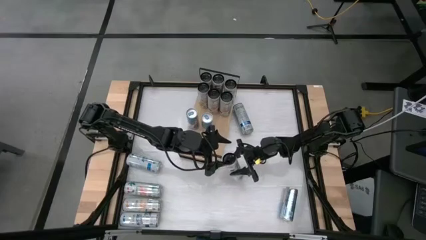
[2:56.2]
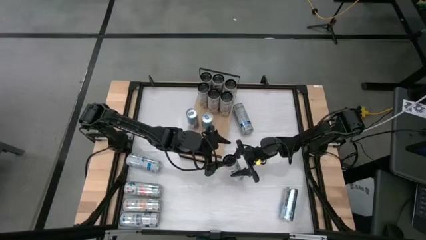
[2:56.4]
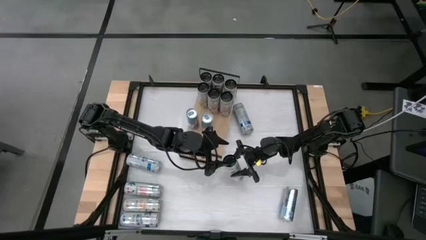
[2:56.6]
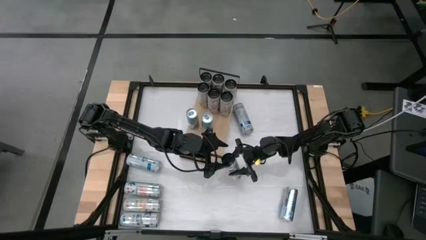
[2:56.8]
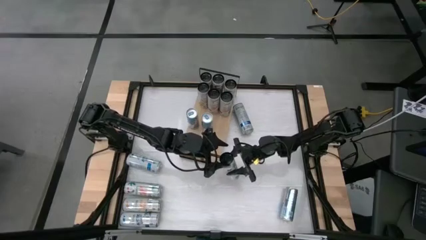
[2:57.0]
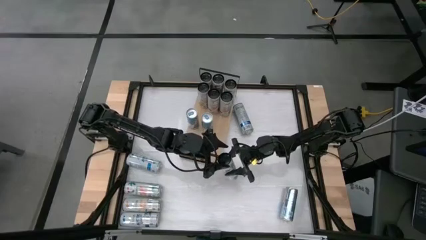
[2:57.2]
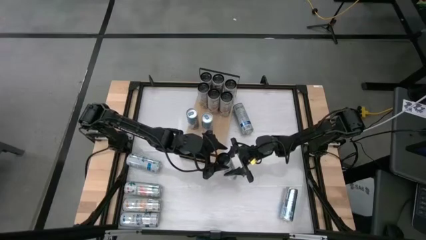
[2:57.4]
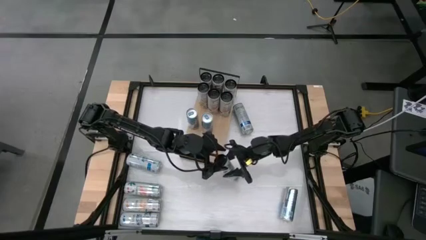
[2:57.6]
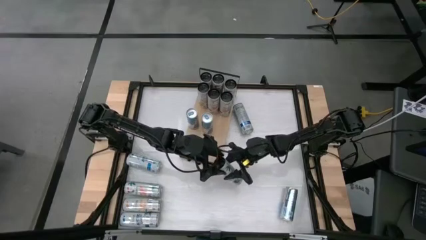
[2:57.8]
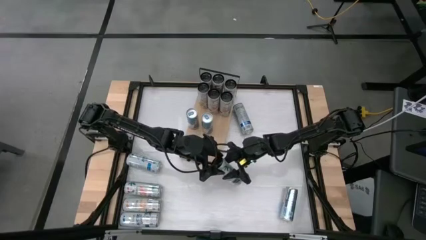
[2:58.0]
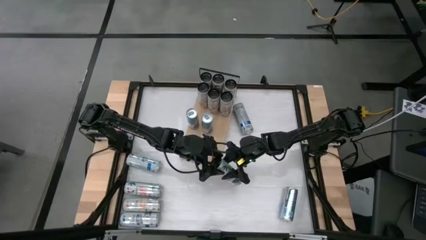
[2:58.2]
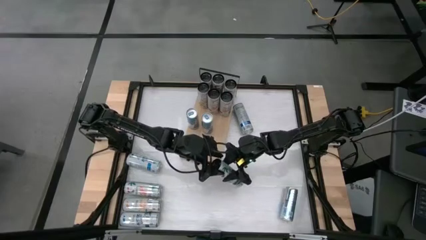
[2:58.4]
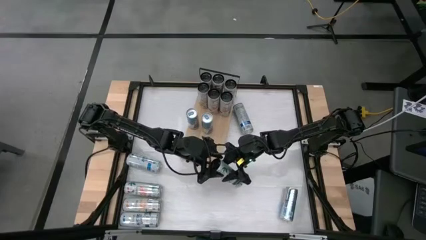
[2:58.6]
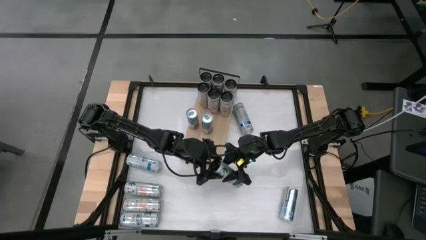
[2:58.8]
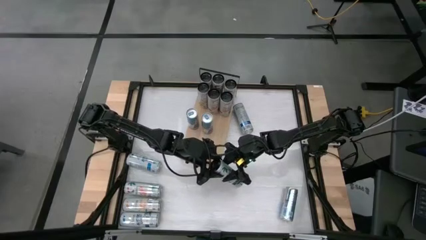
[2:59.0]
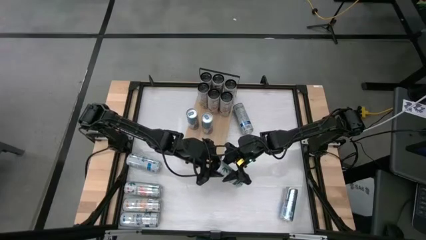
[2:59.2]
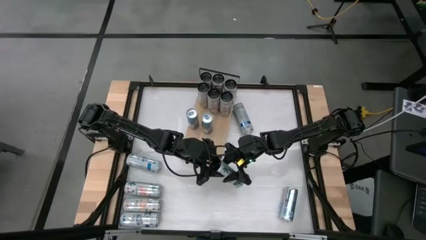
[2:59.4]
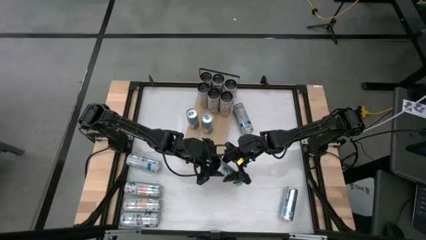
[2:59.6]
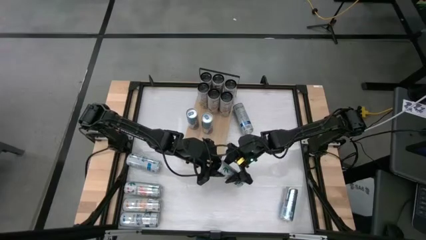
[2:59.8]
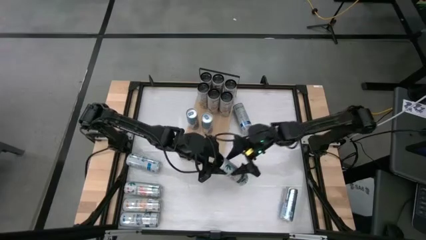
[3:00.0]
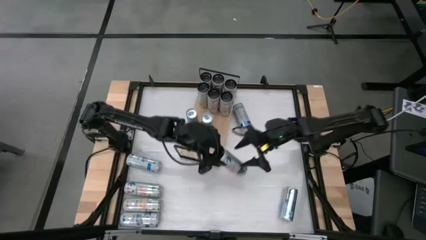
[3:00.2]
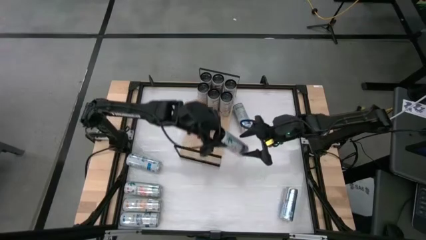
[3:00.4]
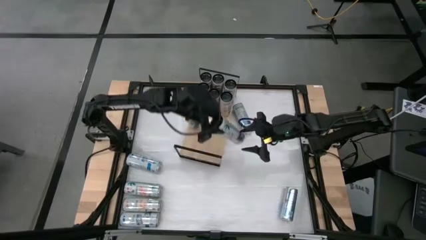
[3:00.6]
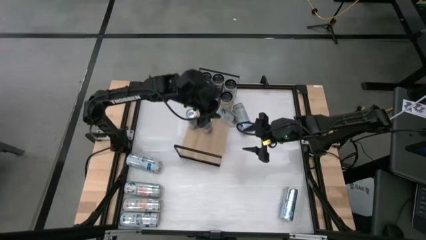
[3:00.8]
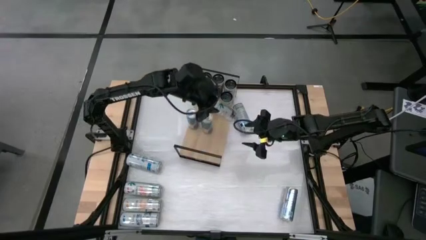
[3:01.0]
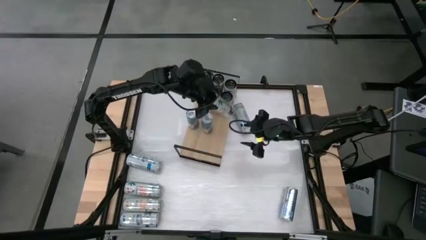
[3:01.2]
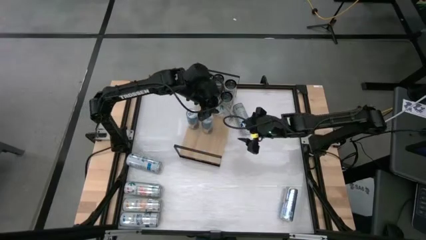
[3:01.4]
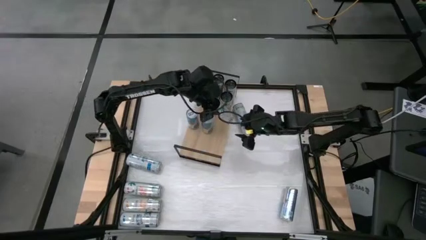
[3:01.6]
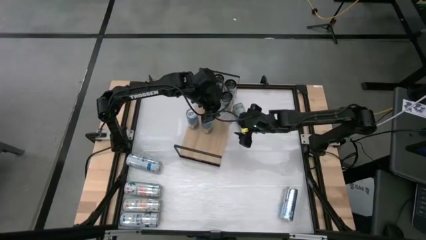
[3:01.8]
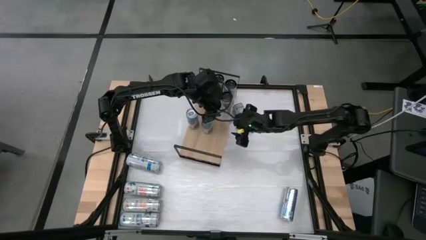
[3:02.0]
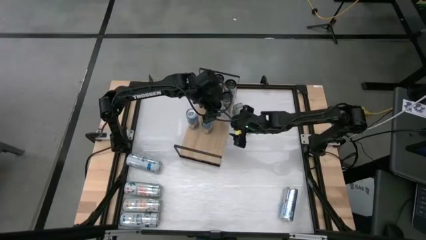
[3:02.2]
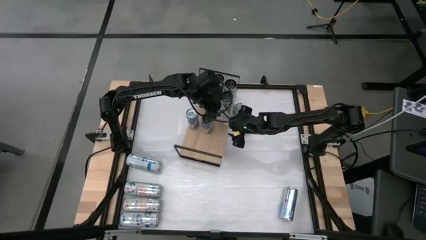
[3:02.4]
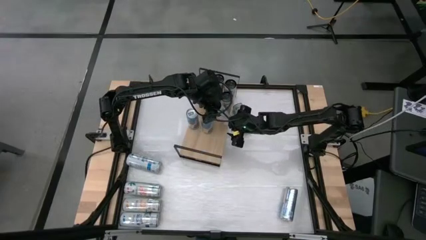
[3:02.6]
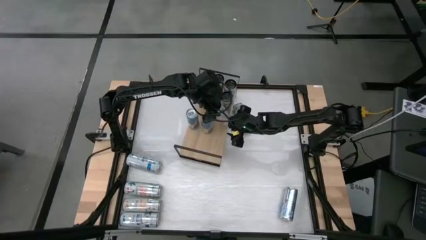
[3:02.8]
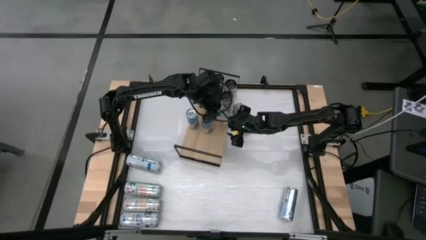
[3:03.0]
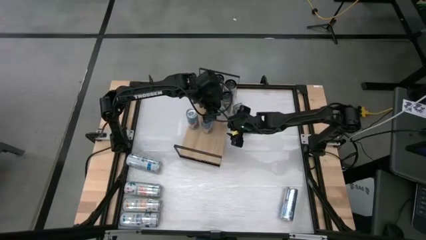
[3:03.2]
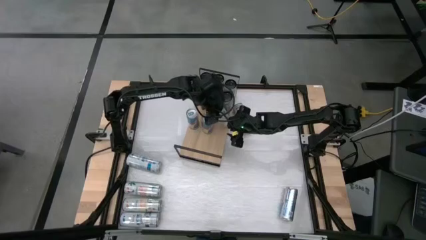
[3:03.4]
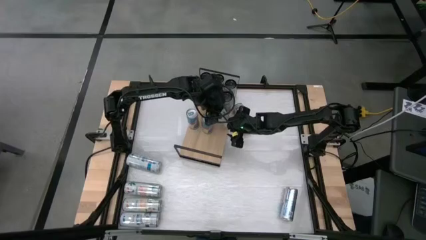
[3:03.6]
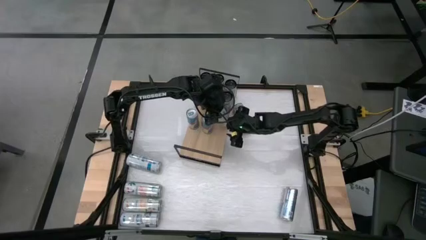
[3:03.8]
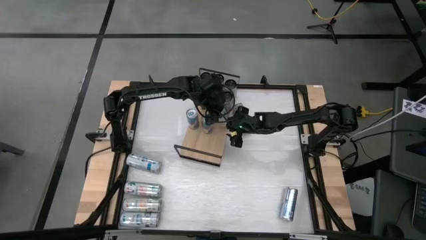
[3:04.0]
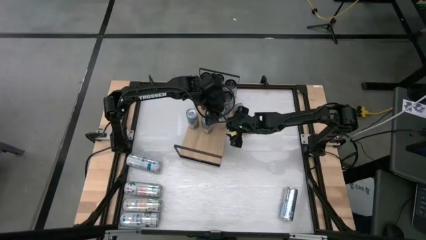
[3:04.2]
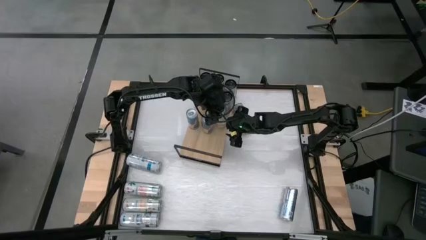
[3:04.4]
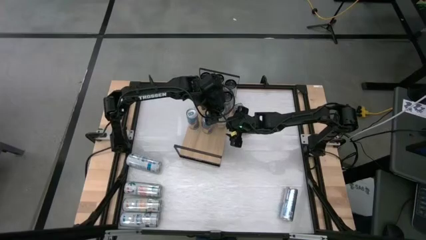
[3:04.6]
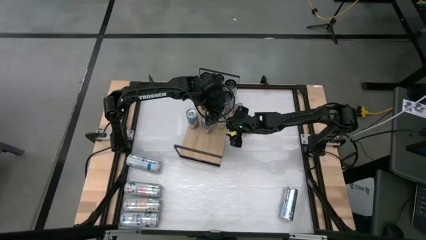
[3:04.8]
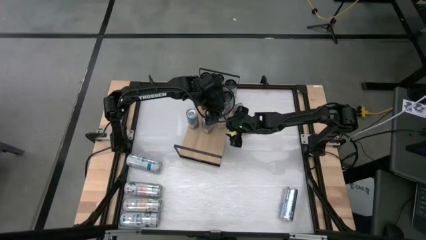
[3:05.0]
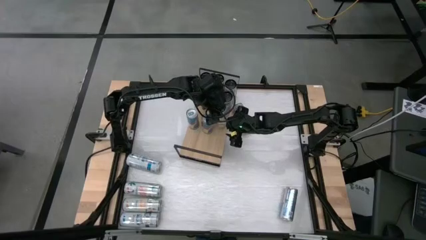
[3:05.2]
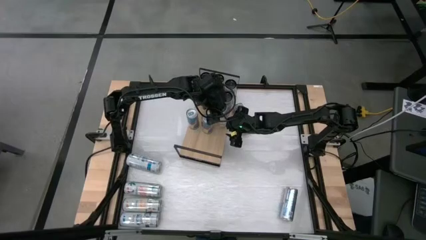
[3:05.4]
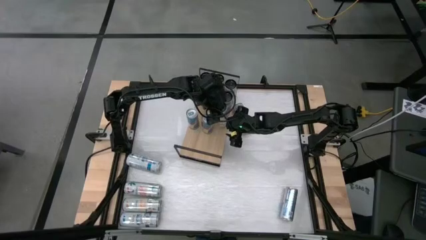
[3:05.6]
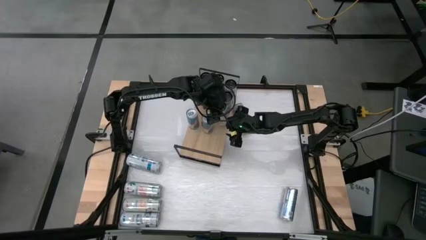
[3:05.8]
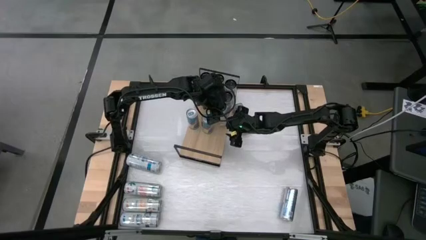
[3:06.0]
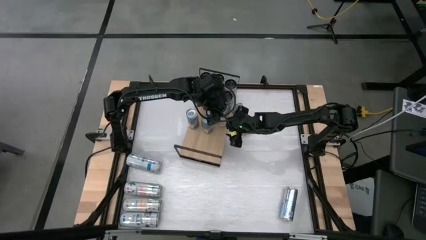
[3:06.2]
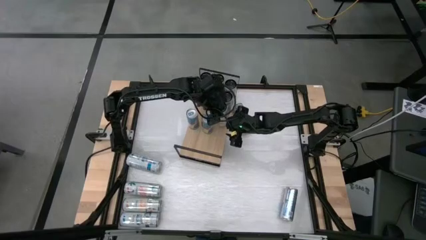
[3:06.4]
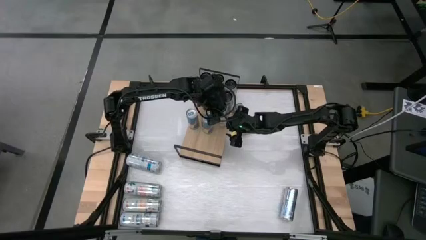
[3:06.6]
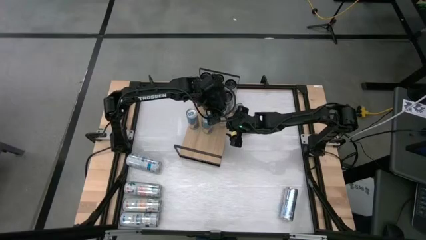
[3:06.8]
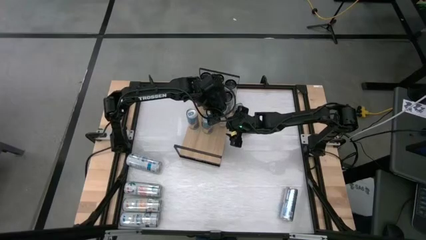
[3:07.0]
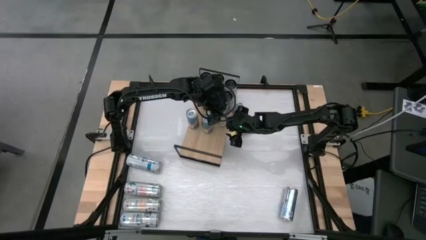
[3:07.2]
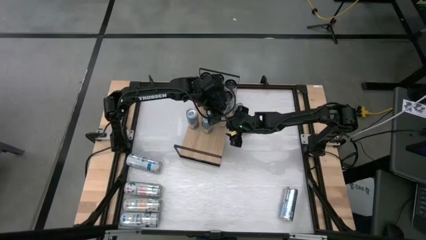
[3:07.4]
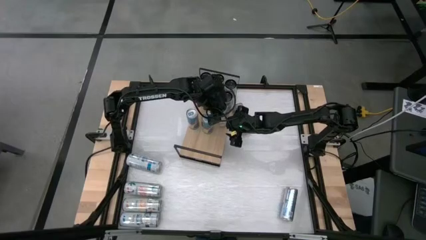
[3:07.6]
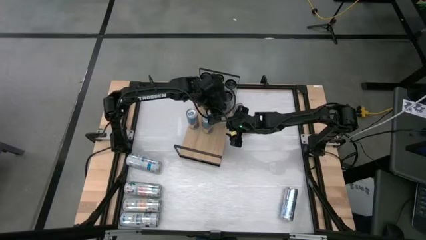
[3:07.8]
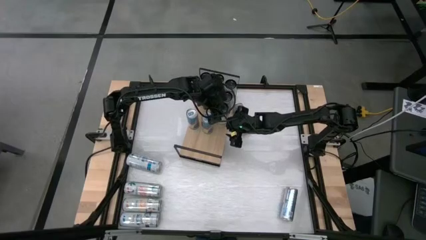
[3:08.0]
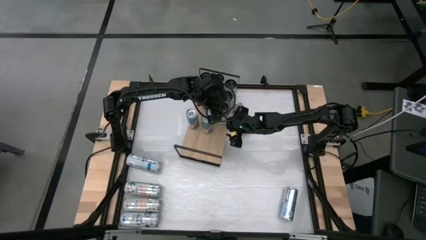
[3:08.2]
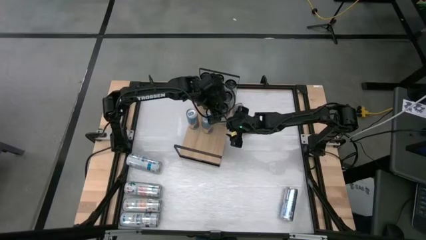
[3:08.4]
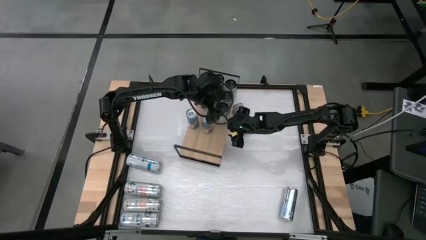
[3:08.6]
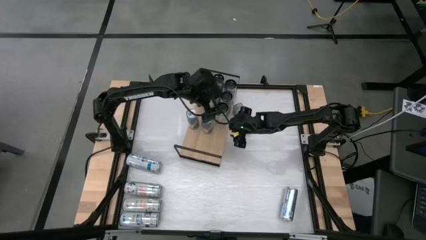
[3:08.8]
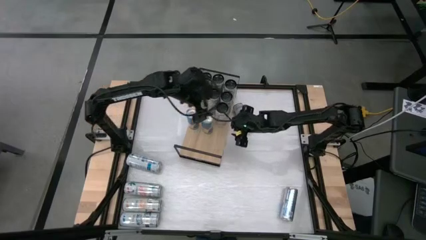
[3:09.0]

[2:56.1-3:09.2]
Task: Place canned beverage on shelf
Put the top right pink soda can on the shelf aligned with the other pink soda can

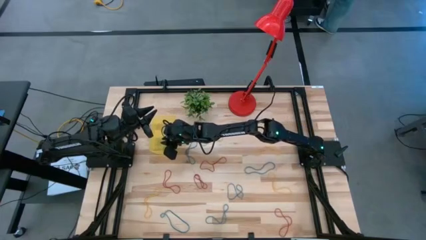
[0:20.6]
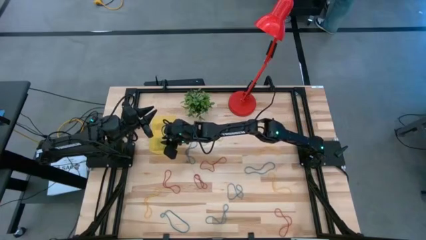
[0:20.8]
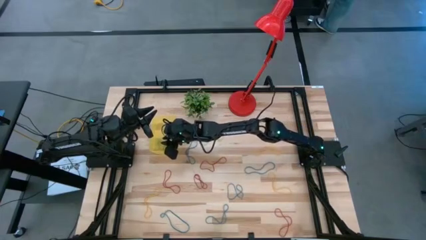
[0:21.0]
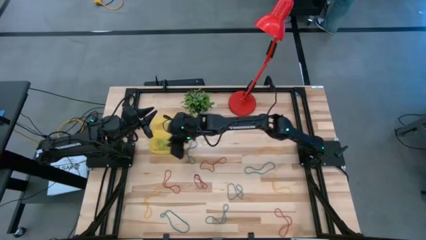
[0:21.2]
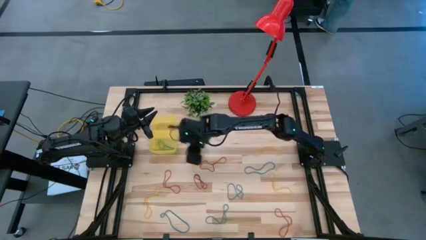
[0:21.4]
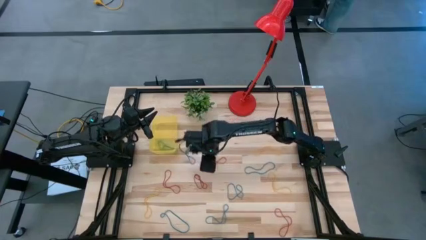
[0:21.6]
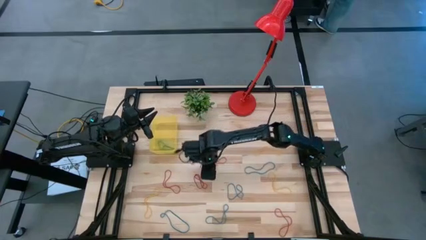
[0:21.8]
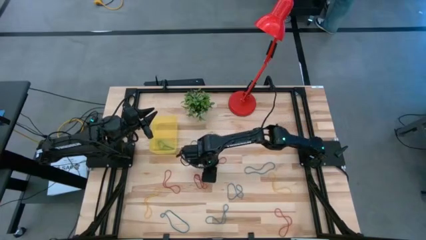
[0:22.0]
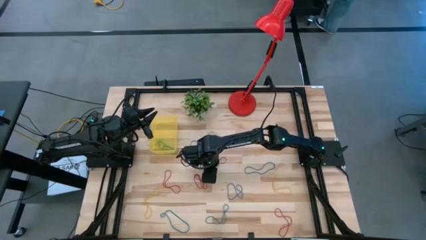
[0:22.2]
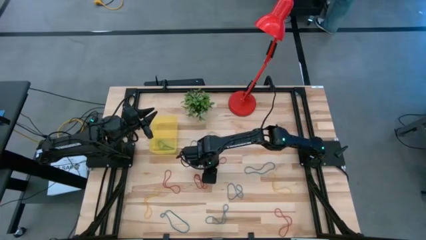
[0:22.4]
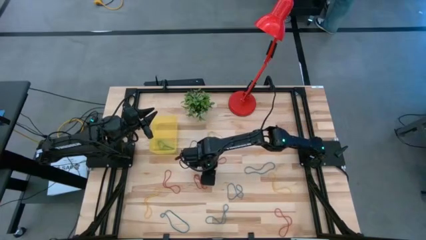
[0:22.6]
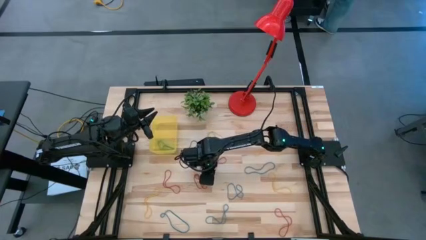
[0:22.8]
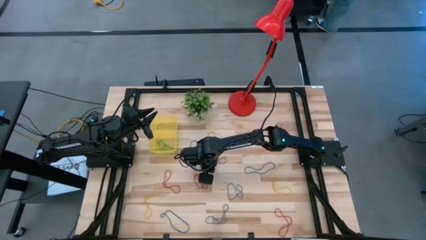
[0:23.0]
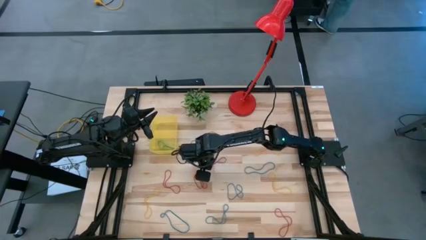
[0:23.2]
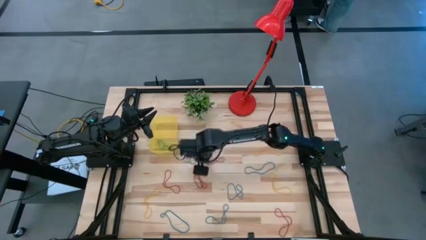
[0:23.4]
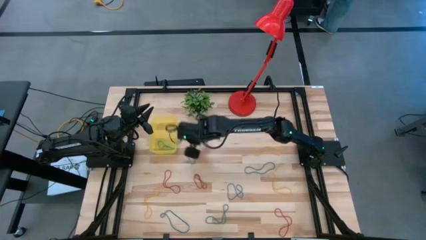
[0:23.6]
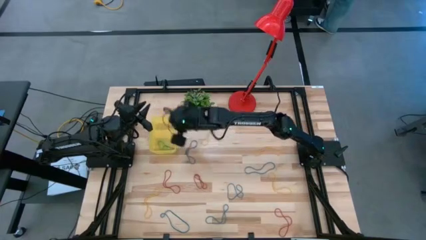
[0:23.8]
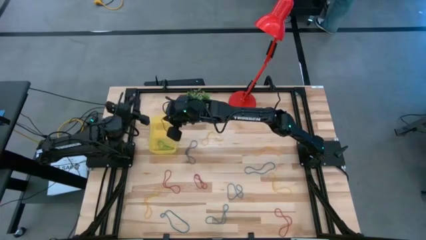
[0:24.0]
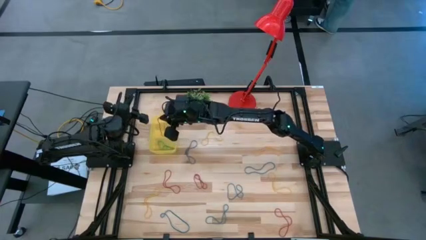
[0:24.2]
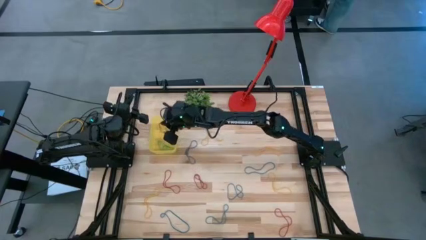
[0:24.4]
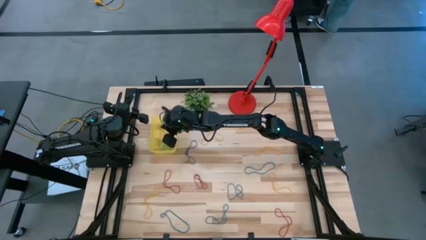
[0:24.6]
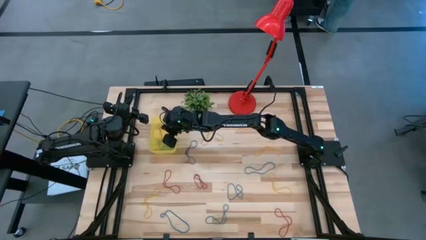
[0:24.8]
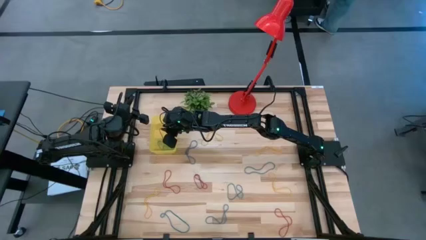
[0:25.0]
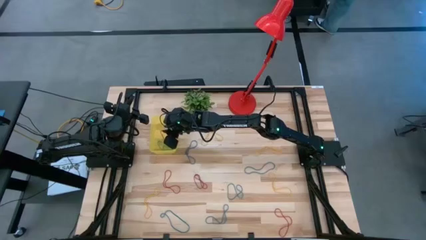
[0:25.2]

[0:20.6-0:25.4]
Task: Pick and place items into bin
Put the red rubber band into the yellow bin
